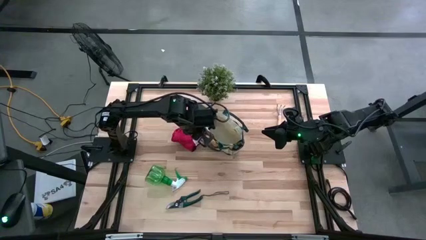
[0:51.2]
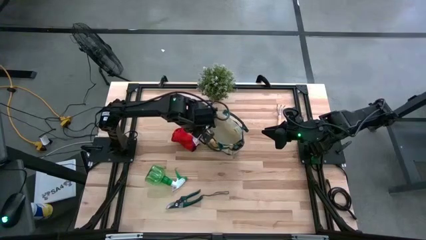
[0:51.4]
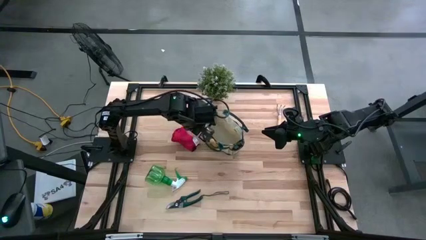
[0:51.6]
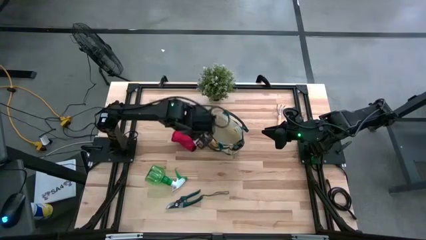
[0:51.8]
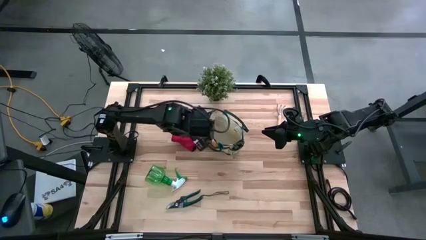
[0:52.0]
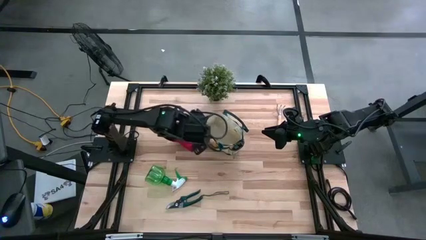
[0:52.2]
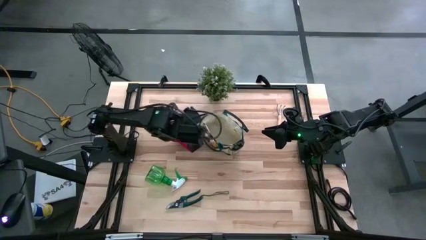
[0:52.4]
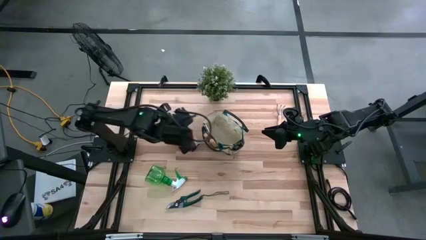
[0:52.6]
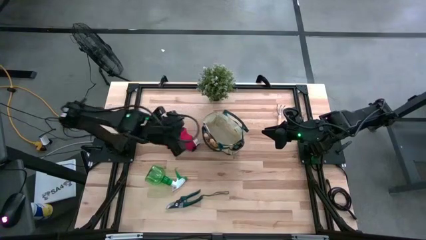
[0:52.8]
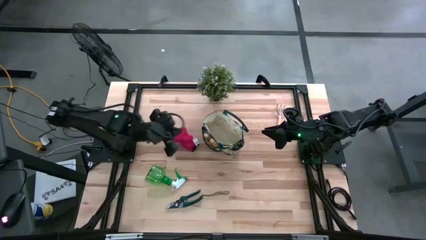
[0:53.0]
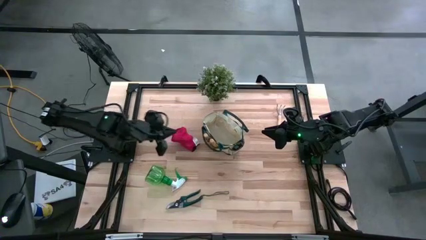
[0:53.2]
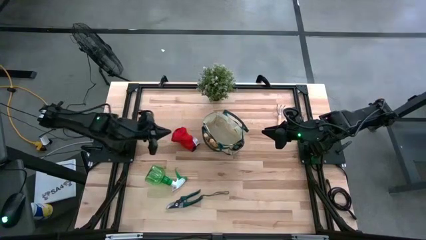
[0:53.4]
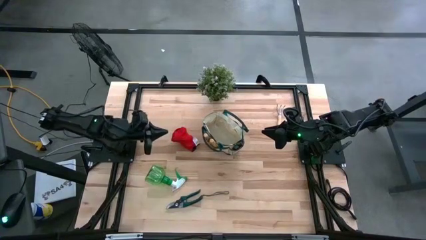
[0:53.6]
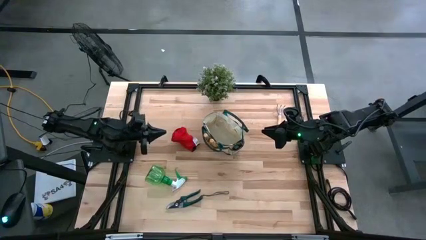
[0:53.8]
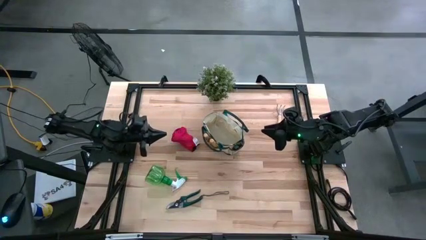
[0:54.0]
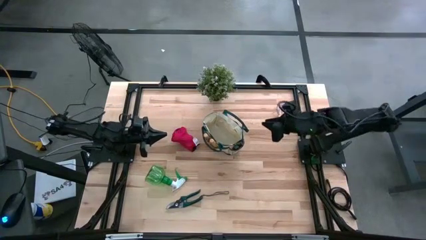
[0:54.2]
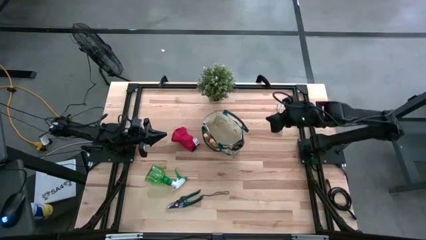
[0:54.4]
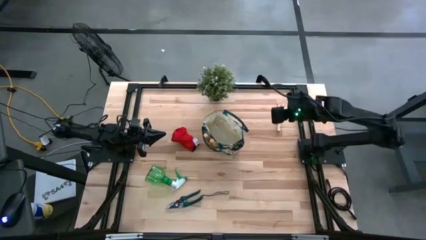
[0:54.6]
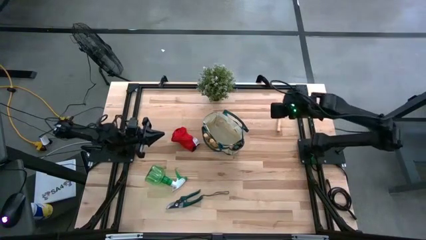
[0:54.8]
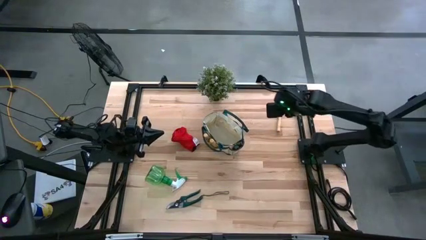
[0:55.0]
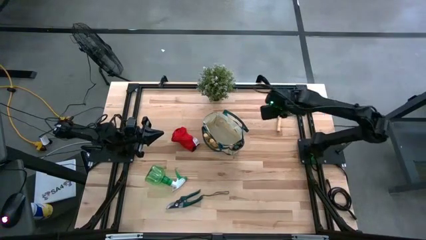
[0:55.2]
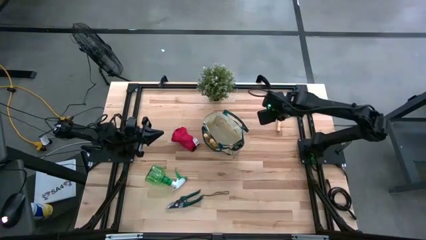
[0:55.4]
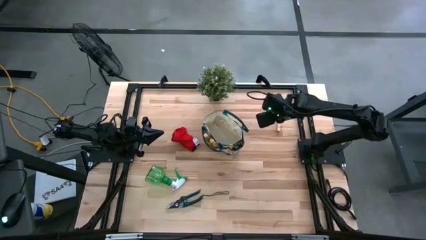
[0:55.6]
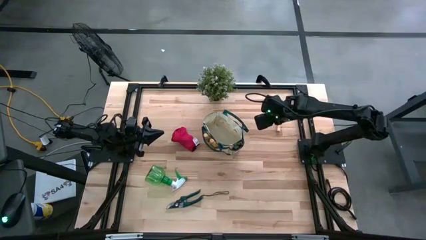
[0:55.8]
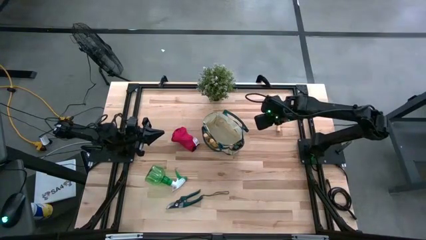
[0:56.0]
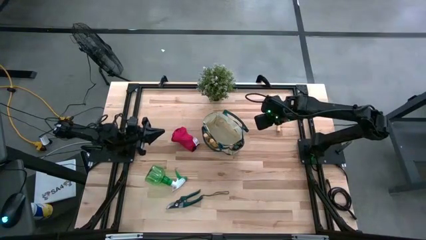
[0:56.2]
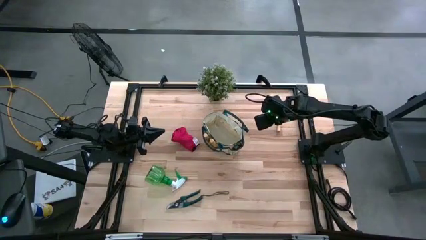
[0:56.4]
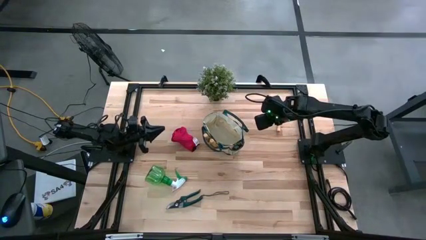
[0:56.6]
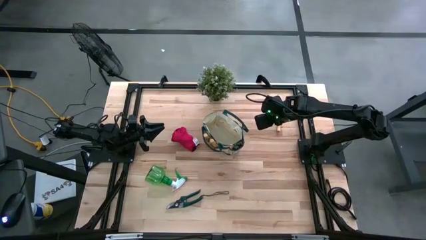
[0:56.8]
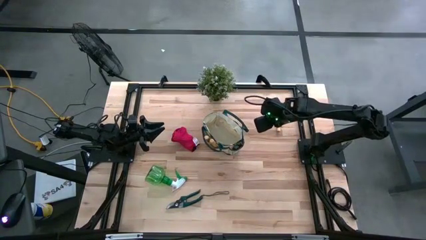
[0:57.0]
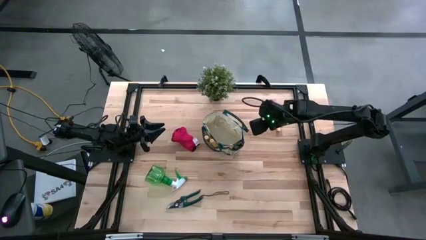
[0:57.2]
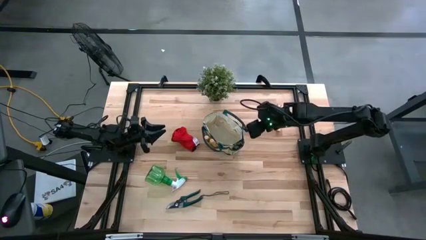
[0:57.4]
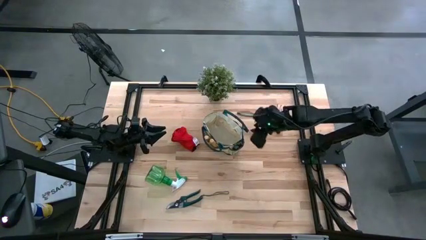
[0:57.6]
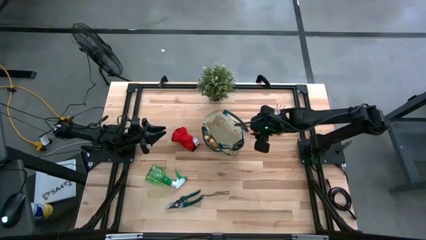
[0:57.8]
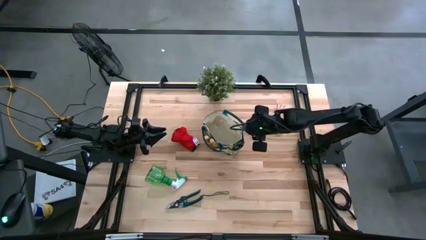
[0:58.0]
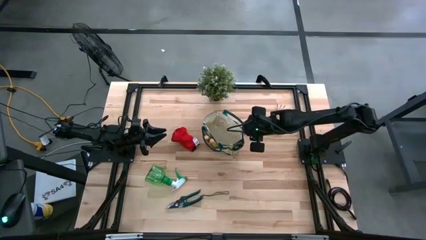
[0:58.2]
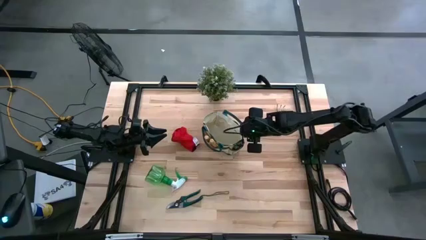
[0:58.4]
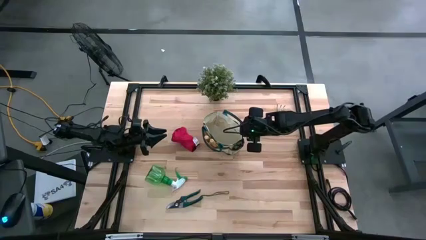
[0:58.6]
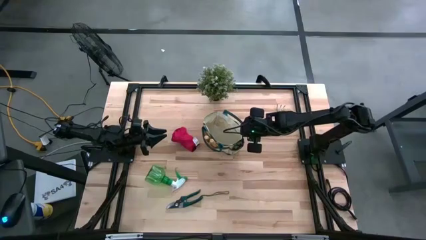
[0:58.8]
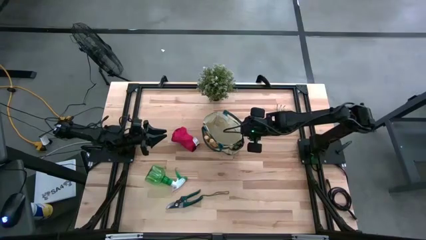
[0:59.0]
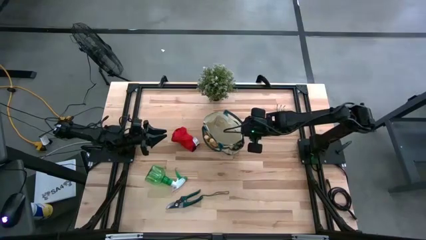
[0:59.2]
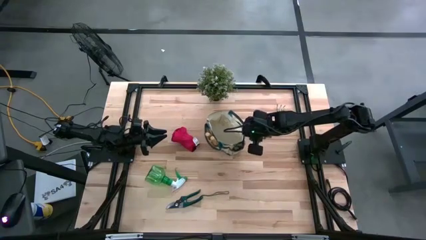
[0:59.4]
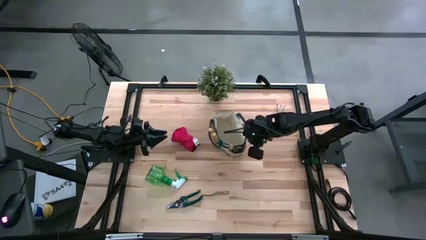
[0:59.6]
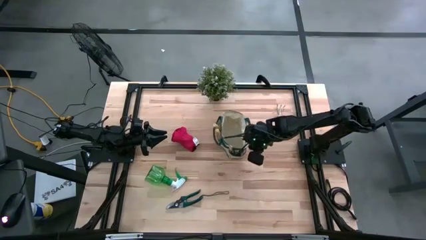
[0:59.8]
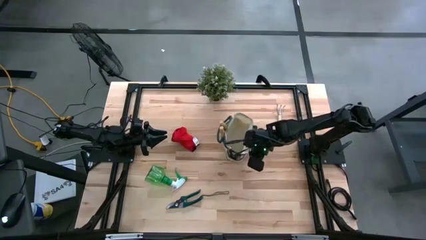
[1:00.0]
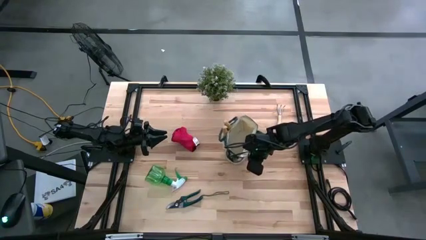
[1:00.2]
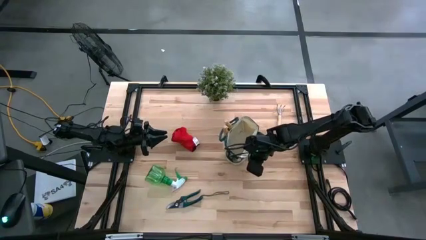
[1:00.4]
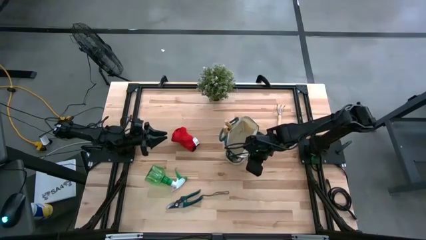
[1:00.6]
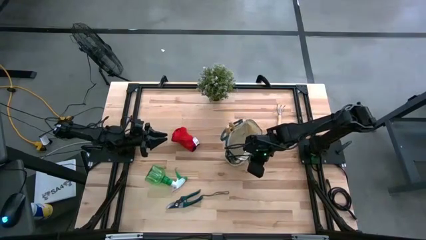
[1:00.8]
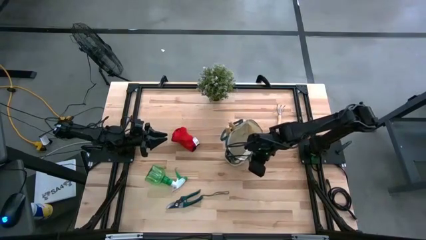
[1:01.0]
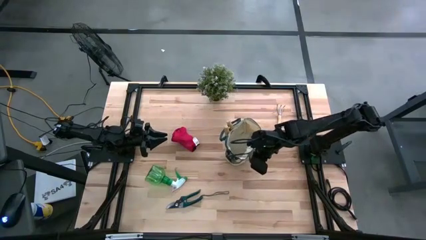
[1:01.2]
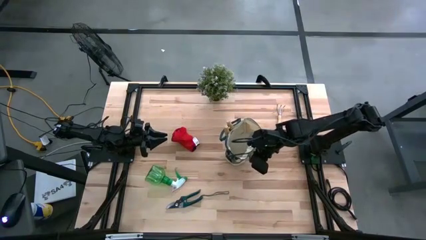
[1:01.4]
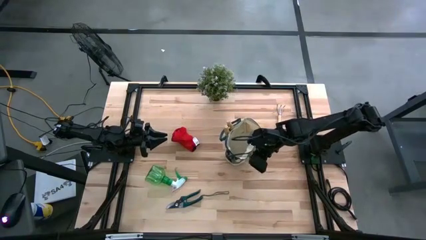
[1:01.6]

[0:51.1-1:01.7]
Task: Pick & Place Garden tools in Gardening bag
Adjust the gardening bag on the table

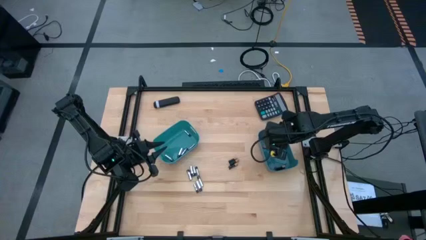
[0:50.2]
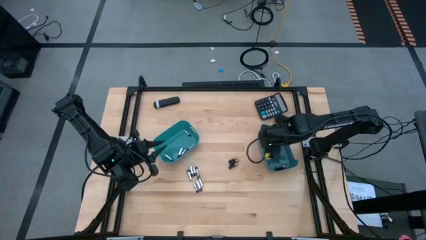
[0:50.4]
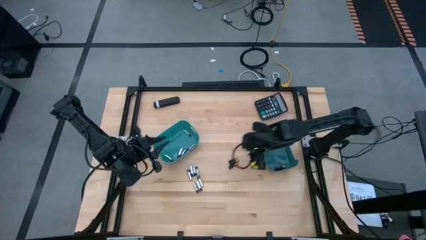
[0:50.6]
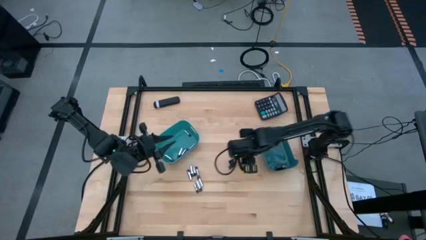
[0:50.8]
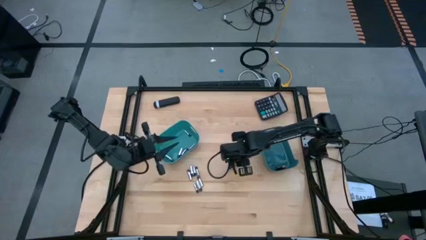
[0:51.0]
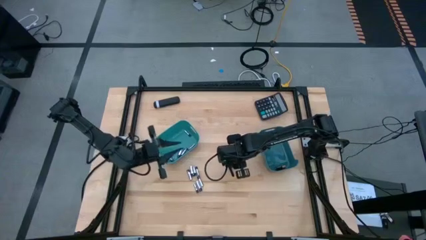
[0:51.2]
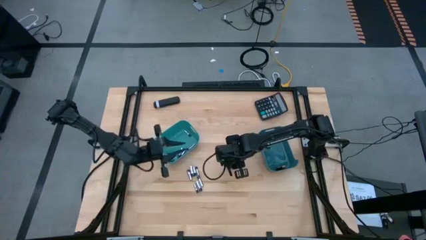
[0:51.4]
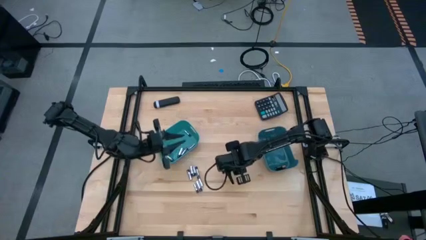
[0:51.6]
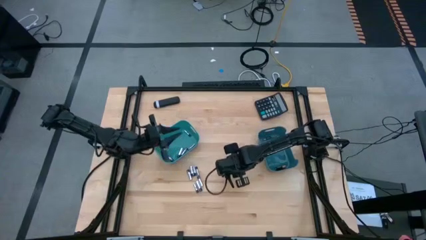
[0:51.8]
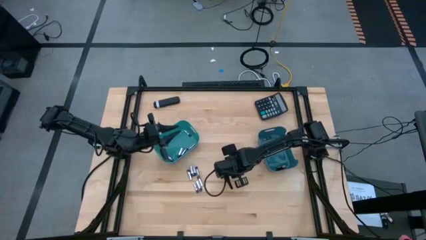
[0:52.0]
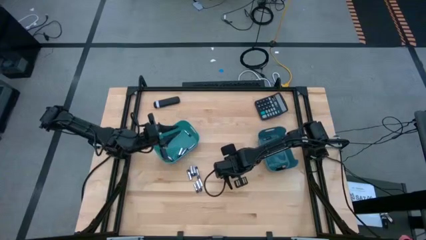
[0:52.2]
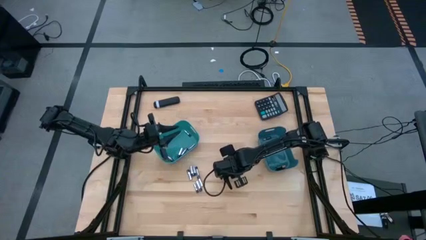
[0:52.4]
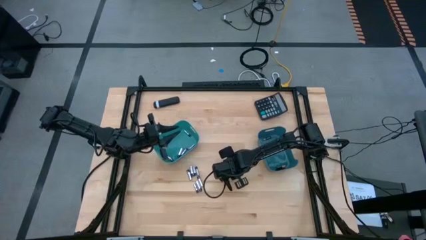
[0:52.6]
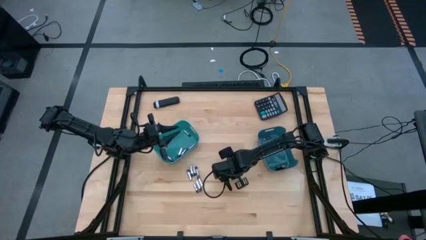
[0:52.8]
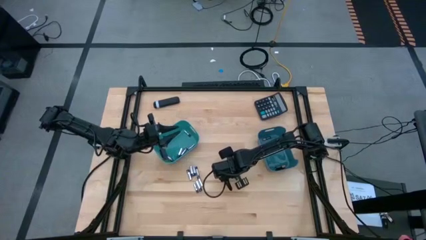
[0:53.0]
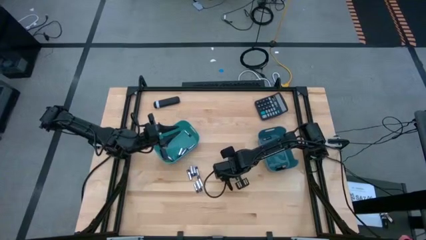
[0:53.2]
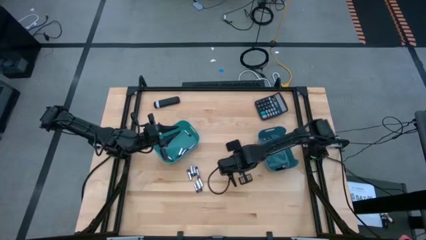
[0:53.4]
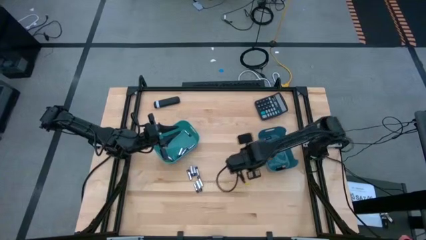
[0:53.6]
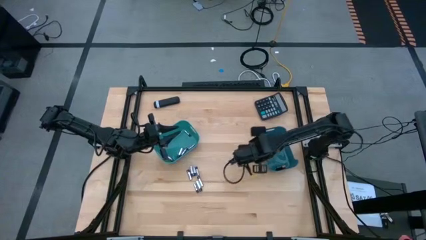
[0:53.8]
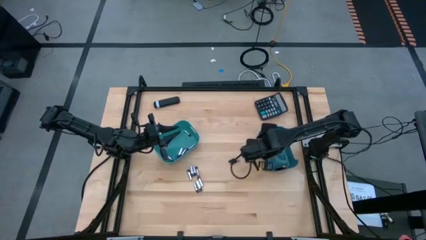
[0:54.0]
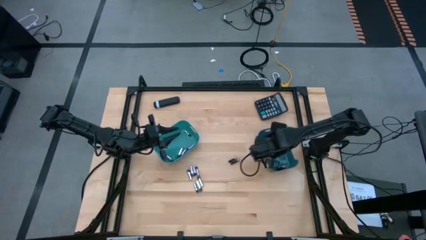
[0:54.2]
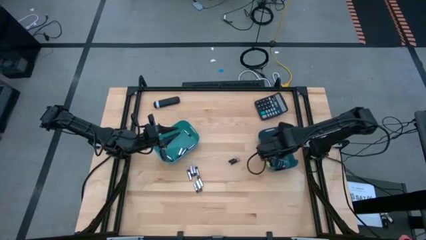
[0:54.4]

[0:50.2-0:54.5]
Task: Sort batteries
Put the black battery into the blue bin

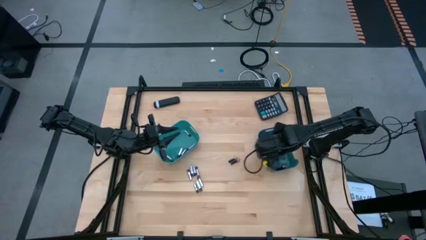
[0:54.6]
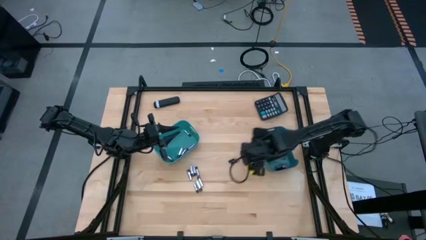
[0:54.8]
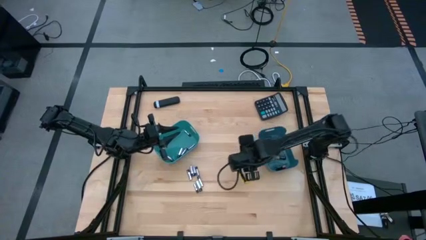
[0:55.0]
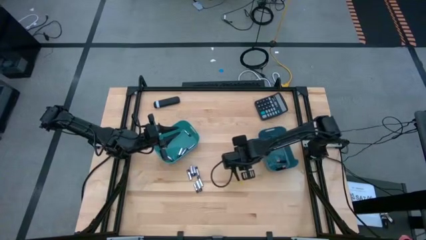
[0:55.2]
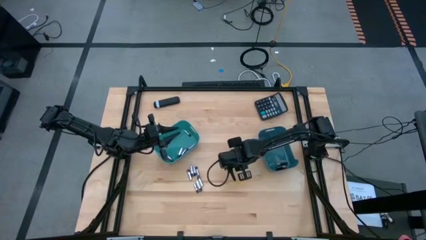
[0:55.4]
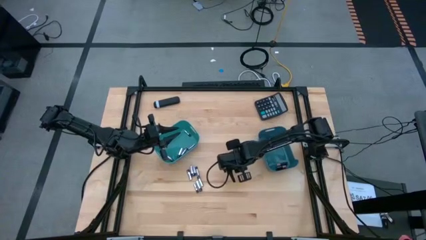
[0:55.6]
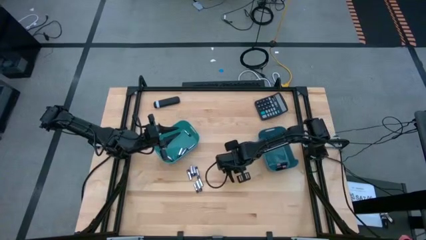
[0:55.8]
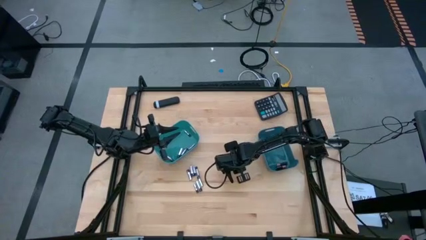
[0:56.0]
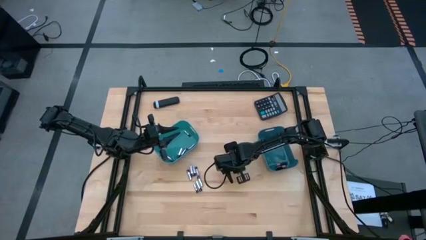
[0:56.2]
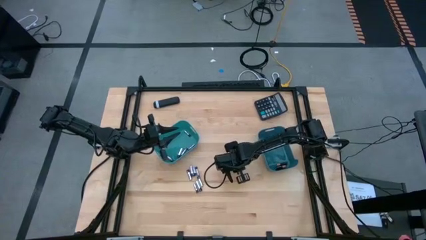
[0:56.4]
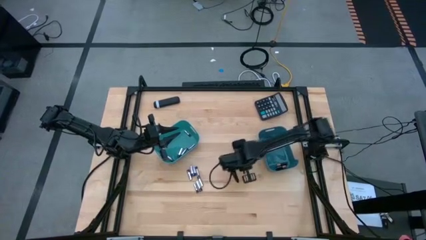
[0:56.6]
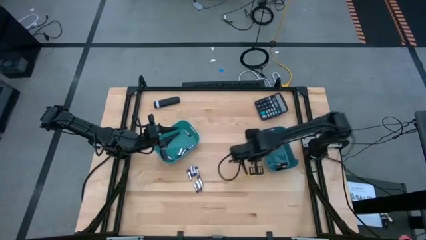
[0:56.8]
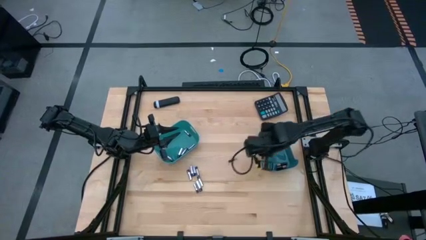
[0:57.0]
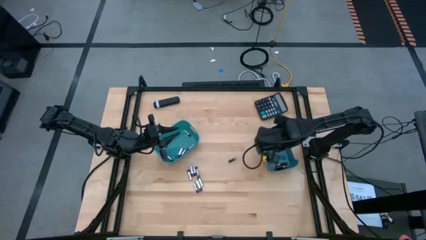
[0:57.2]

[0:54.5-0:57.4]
Put the black battery into the blue bin
